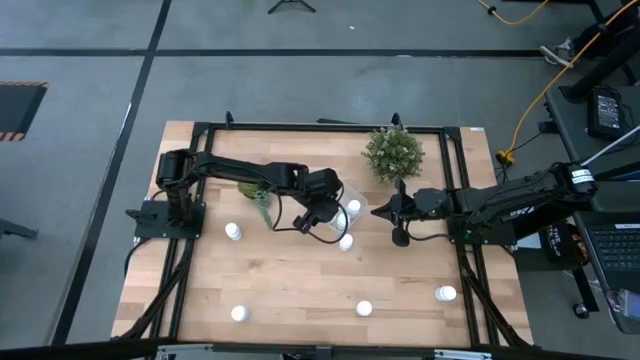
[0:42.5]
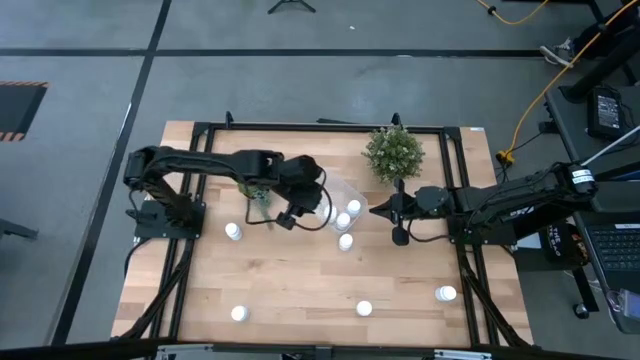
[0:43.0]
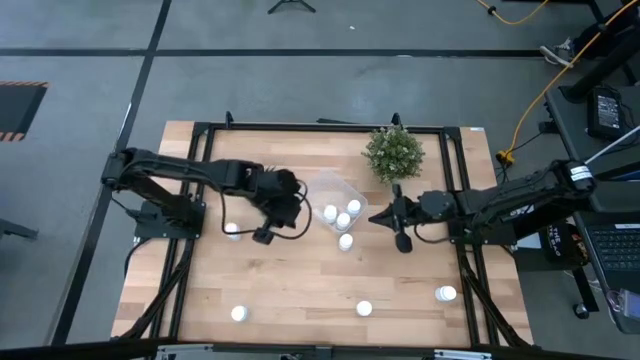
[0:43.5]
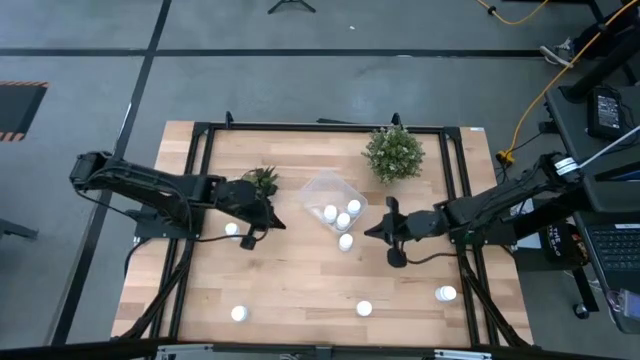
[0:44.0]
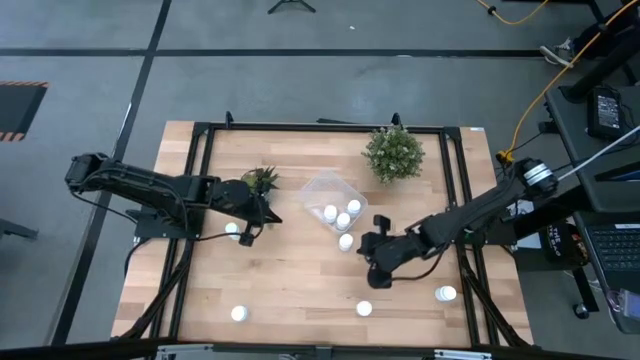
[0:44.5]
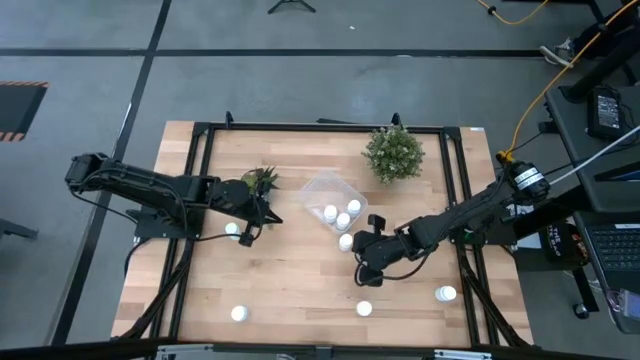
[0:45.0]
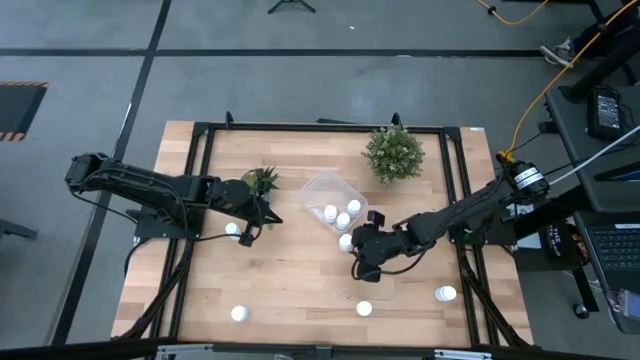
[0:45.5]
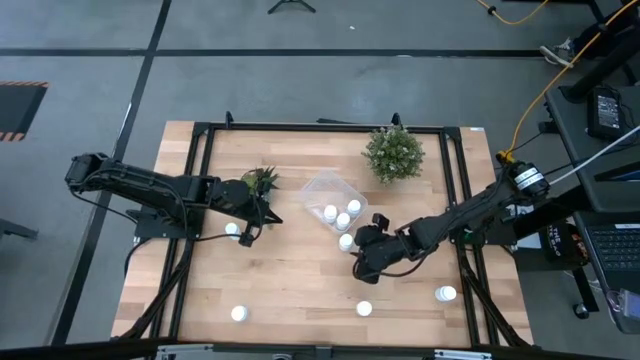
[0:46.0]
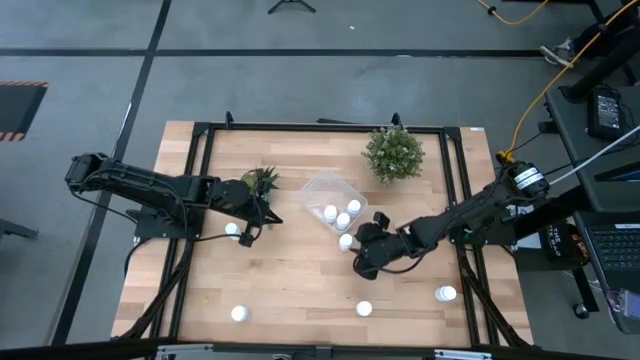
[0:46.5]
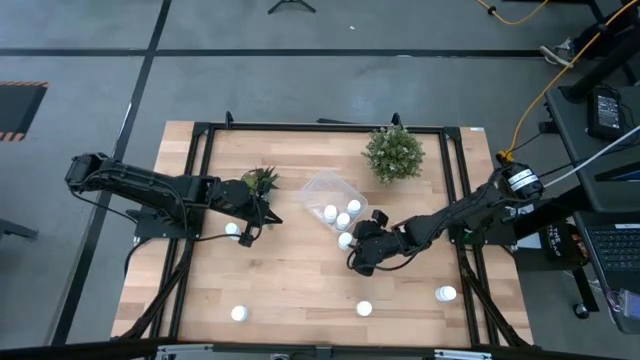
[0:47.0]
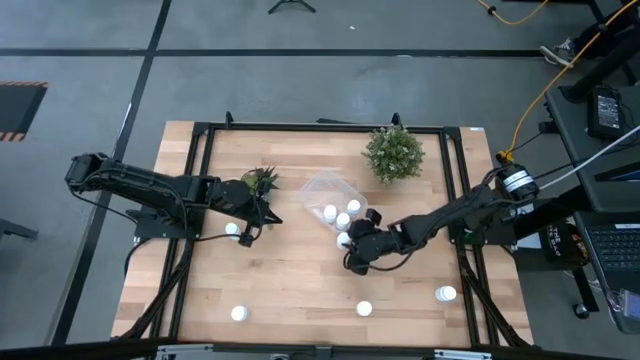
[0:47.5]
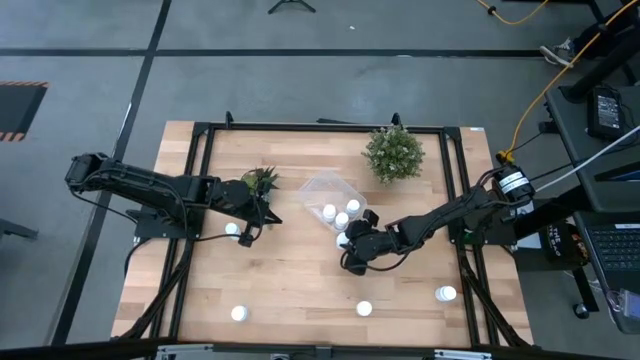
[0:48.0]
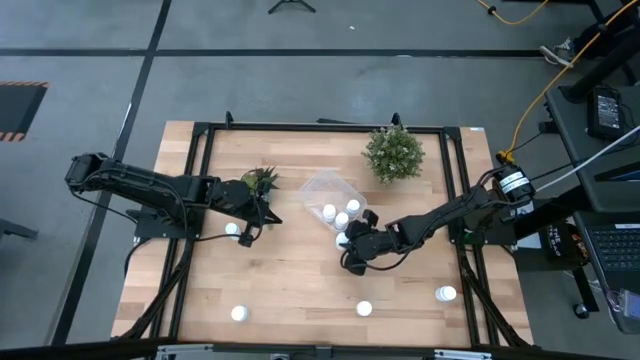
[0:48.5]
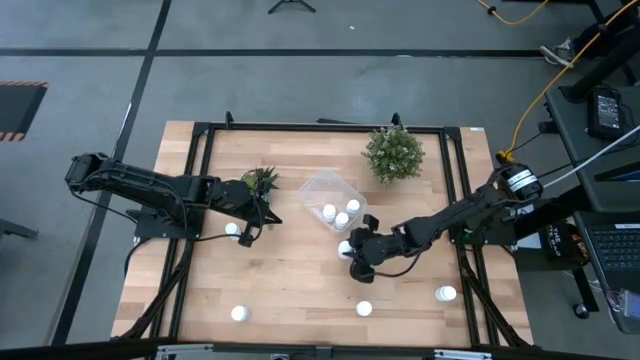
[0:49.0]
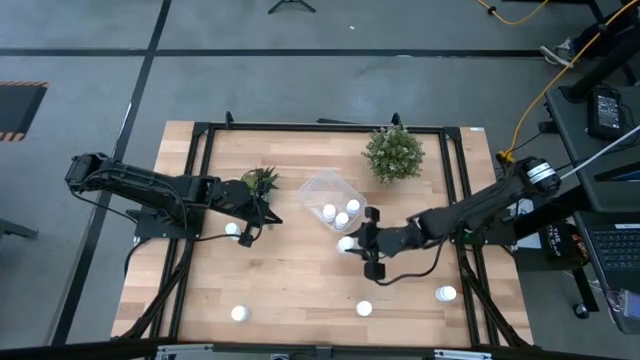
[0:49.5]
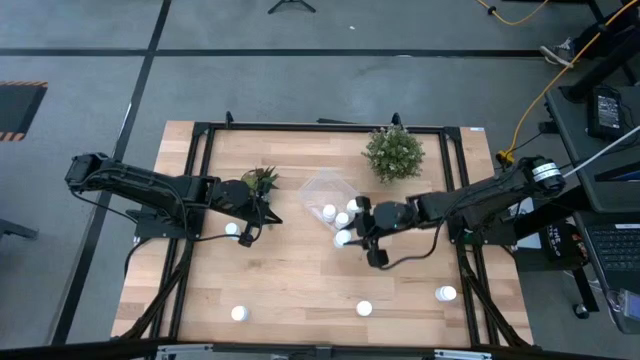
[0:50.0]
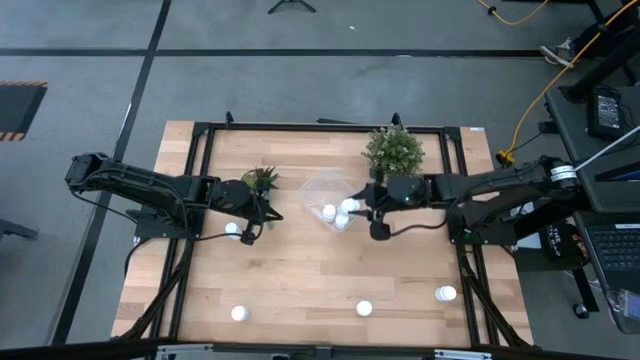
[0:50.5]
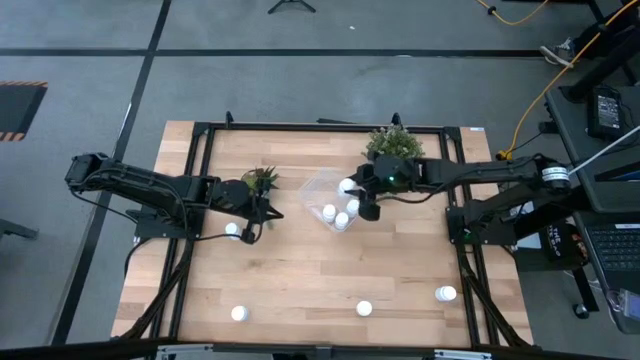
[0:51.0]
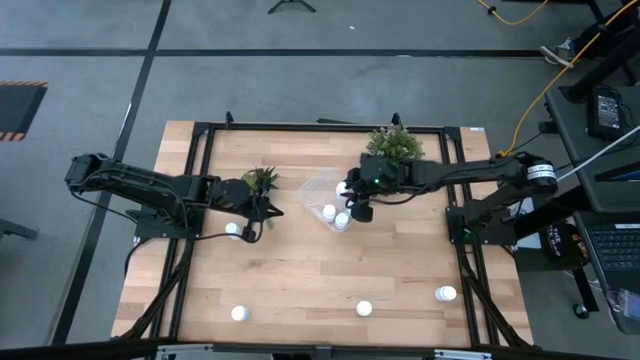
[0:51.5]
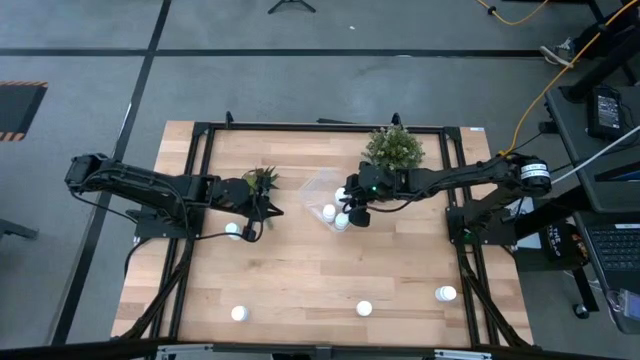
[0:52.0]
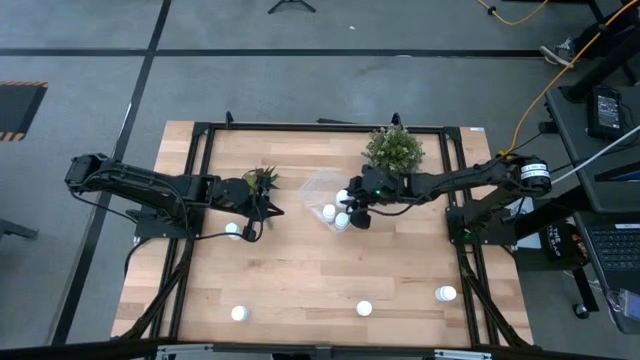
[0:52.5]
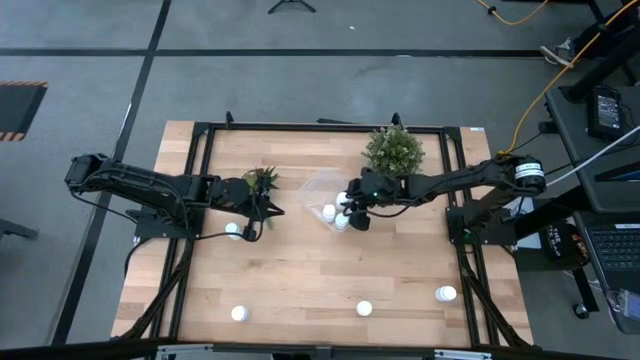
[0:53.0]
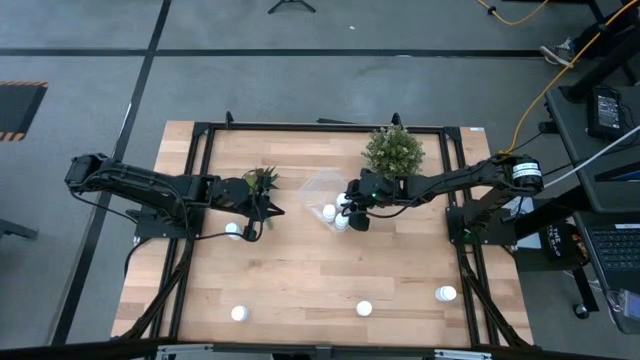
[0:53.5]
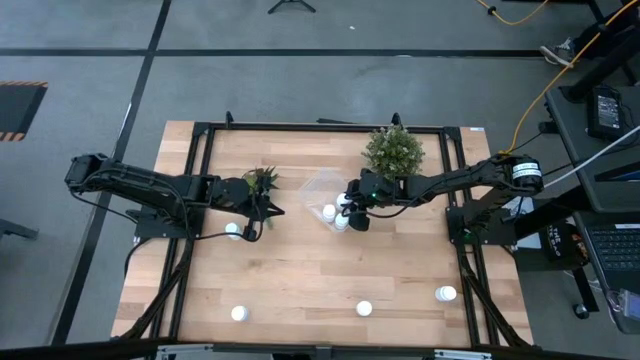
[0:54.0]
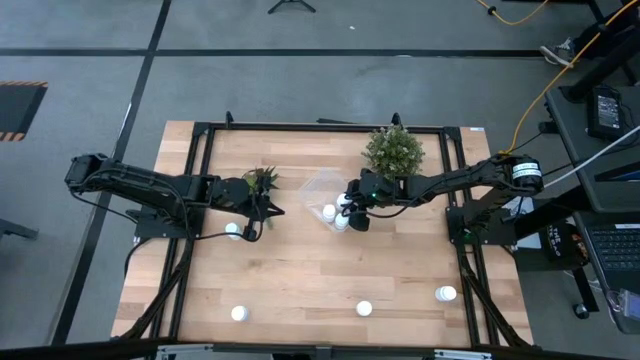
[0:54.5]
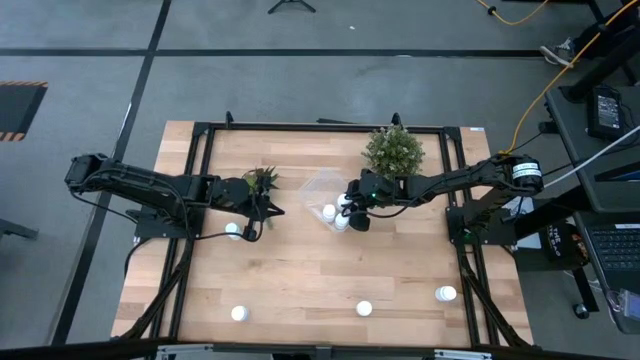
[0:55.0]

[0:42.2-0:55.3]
Task: Pick and place pill bottles into a basket
Put the pill bottle into the transparent bin
